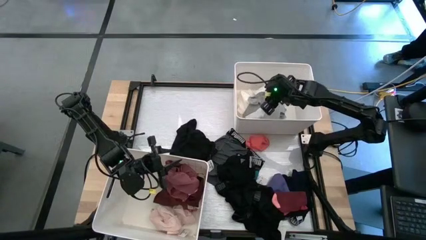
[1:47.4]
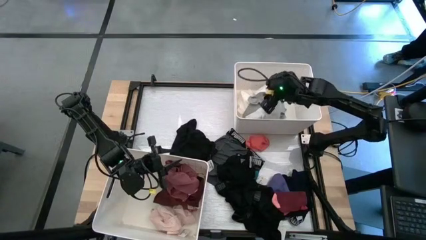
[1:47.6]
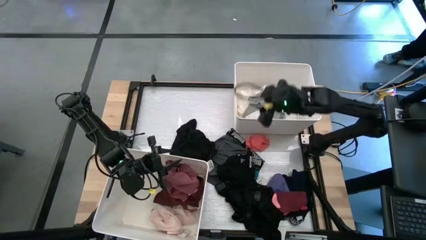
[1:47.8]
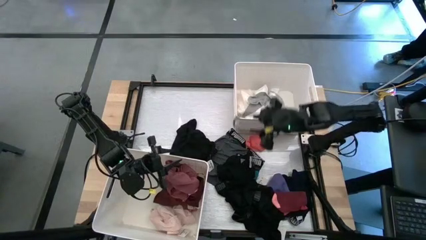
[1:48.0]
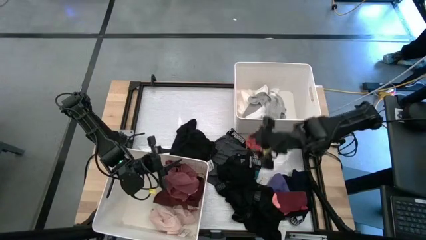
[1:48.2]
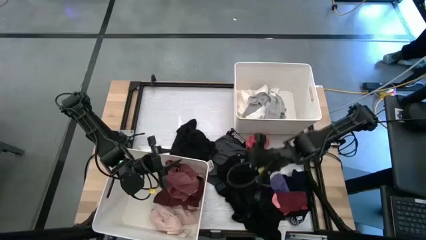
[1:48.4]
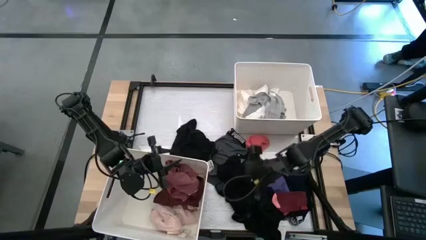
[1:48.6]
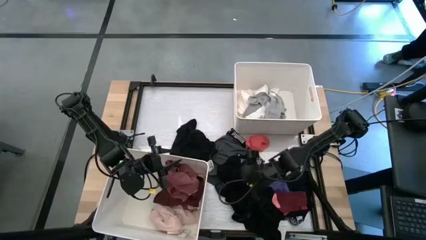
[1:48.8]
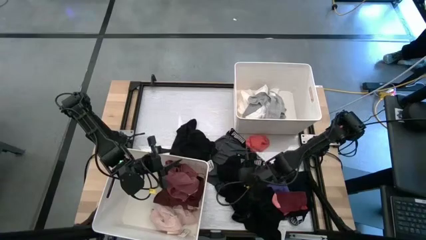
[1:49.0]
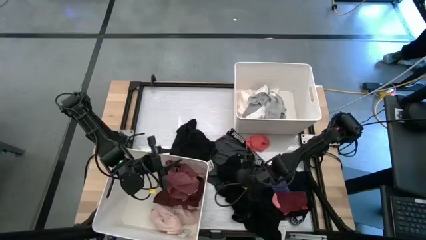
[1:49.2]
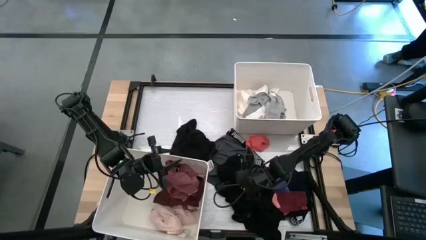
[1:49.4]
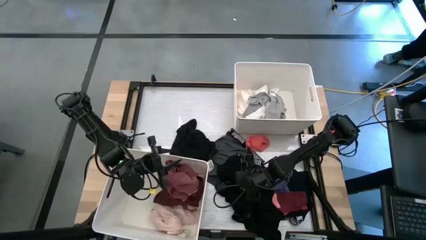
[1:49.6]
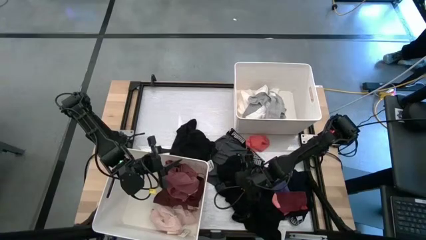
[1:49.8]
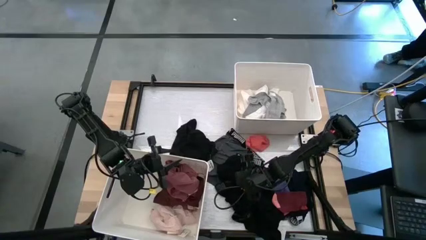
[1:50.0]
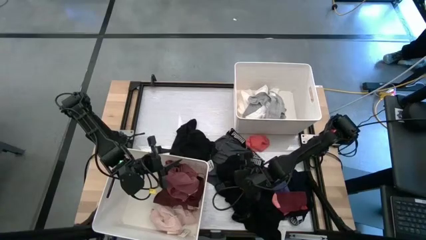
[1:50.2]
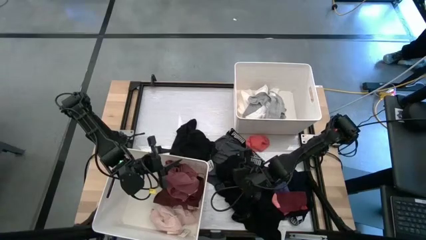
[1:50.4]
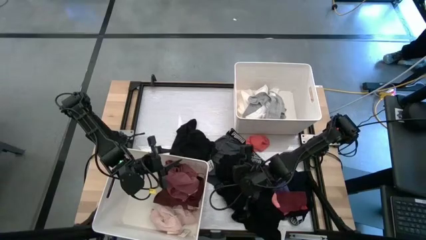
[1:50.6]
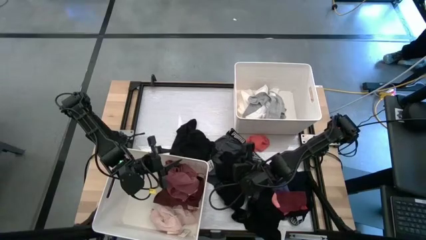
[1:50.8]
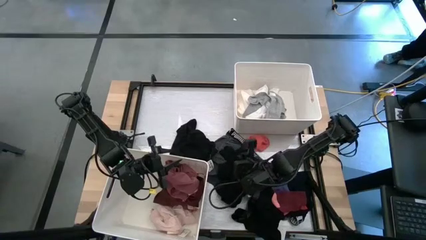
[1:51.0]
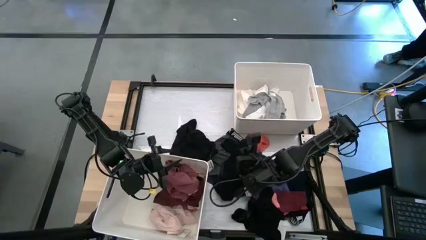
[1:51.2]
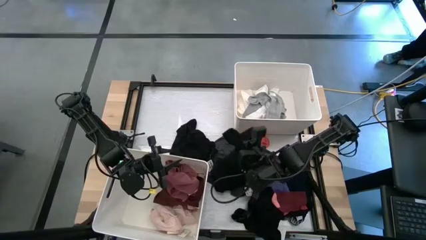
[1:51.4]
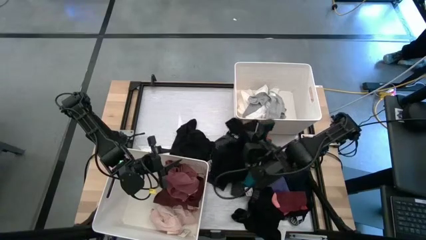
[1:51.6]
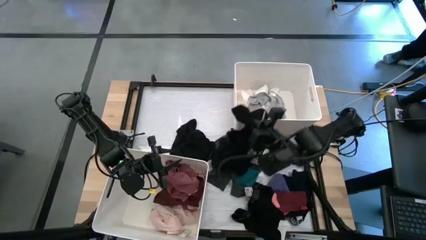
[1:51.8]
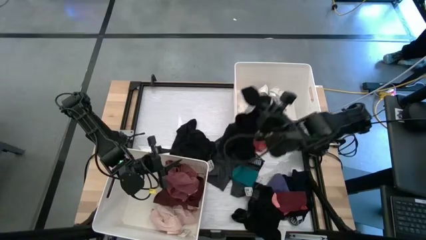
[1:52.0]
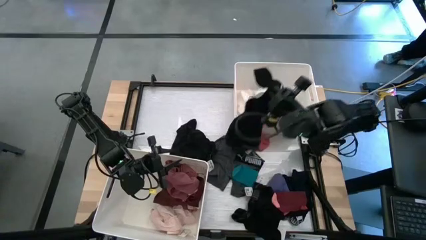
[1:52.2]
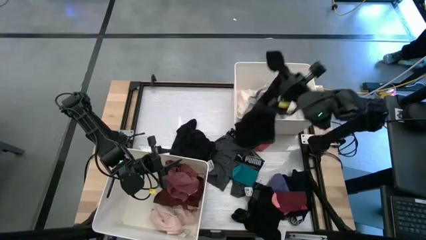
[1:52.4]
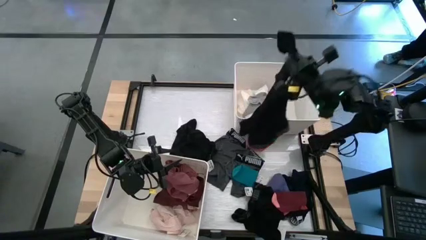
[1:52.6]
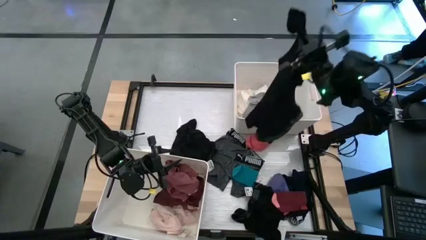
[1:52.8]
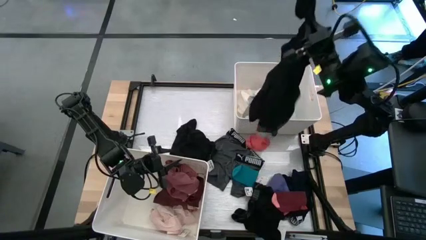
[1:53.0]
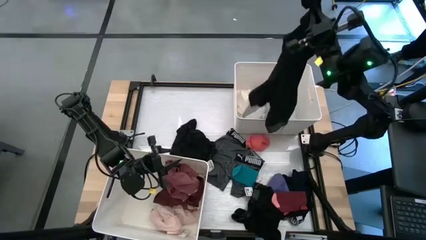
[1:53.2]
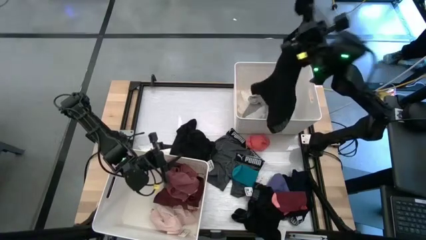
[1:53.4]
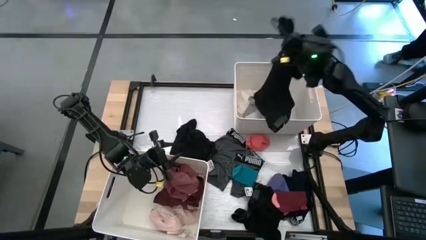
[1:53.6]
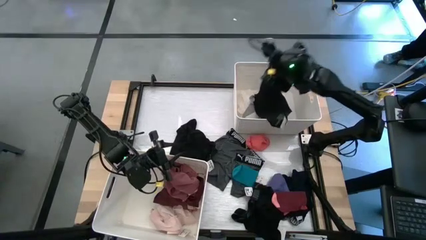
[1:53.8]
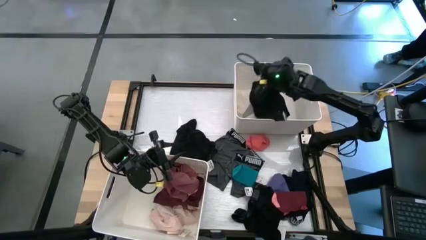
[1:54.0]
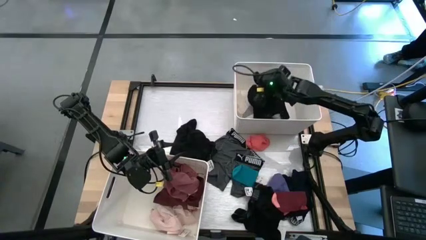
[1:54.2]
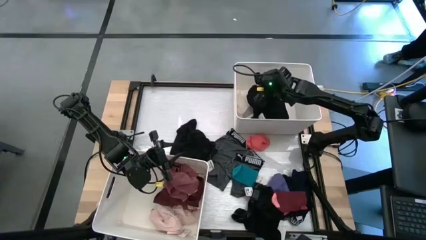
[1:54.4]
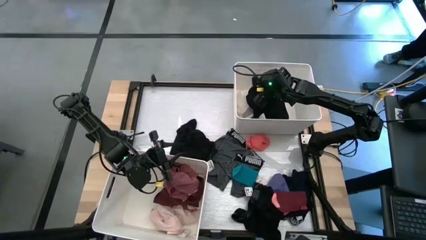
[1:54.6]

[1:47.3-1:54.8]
Task: Sort clothes
Put the black shirt into the top white bin

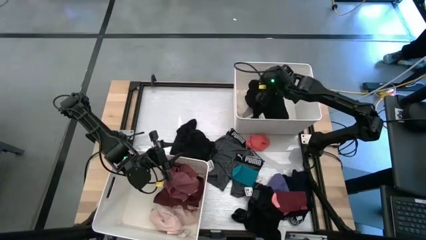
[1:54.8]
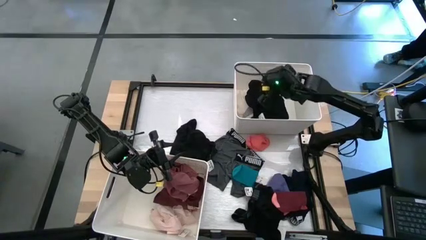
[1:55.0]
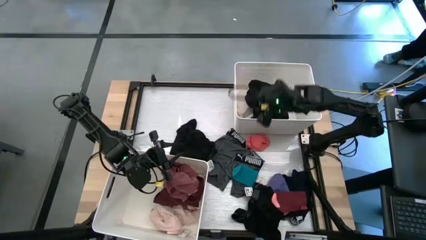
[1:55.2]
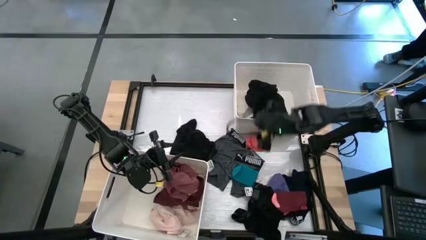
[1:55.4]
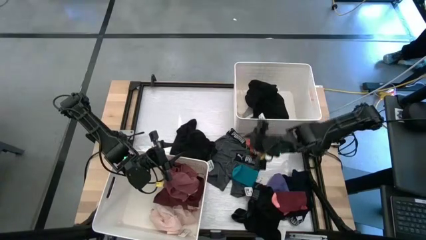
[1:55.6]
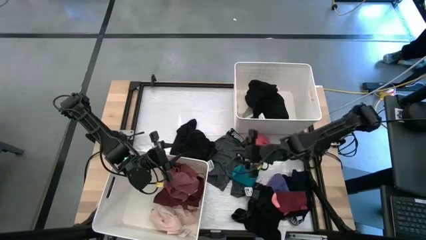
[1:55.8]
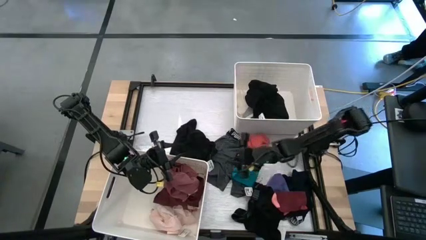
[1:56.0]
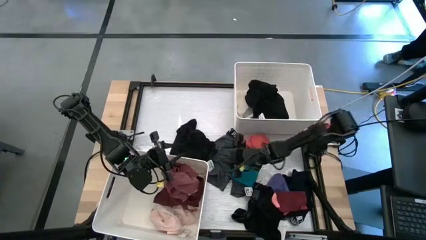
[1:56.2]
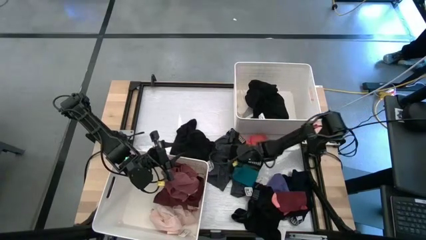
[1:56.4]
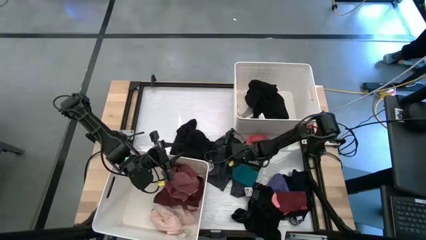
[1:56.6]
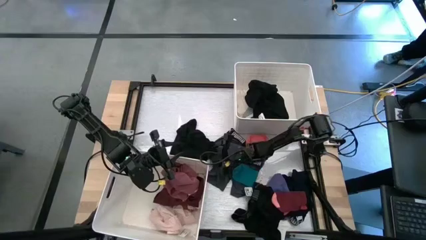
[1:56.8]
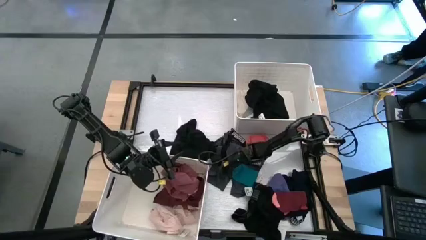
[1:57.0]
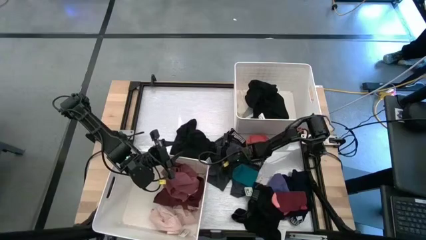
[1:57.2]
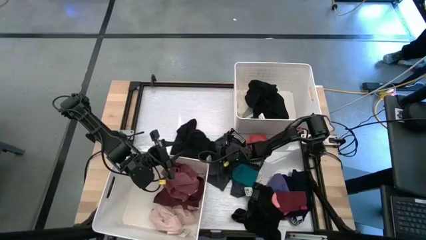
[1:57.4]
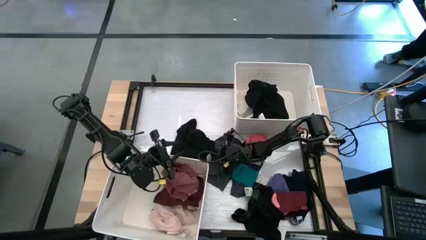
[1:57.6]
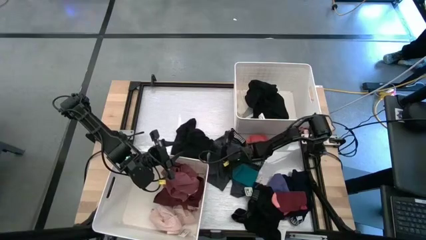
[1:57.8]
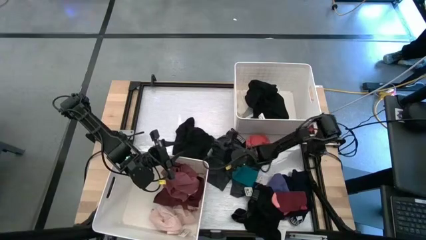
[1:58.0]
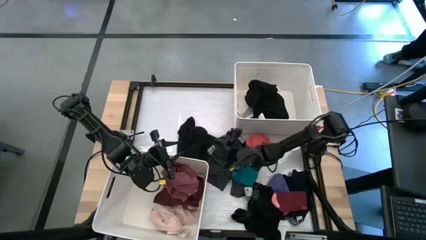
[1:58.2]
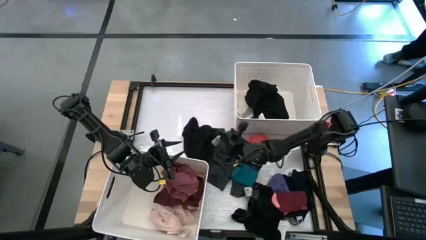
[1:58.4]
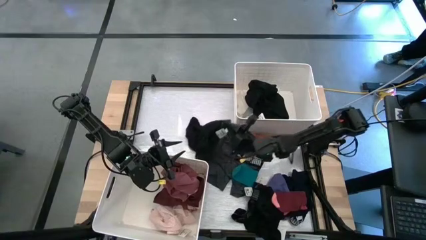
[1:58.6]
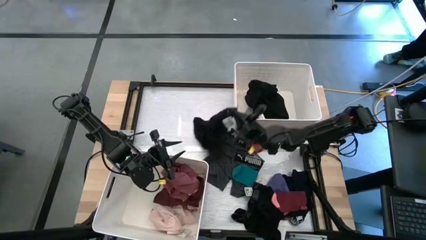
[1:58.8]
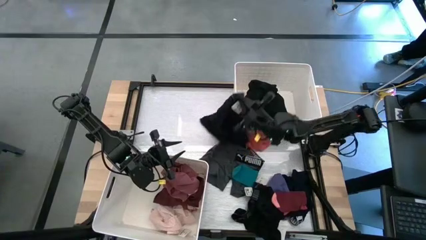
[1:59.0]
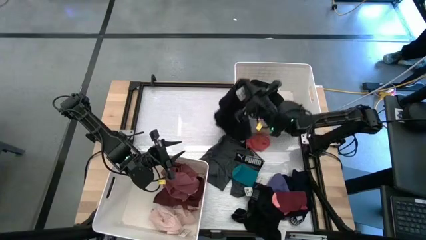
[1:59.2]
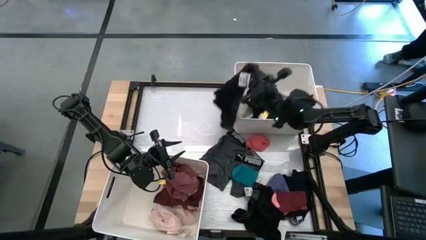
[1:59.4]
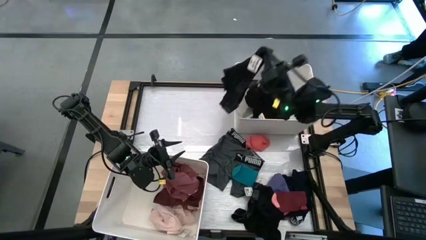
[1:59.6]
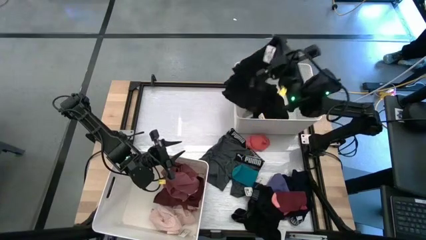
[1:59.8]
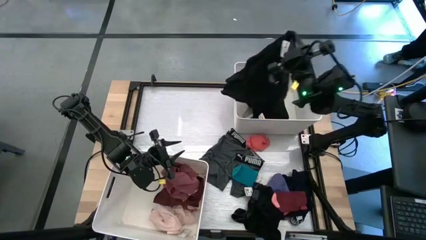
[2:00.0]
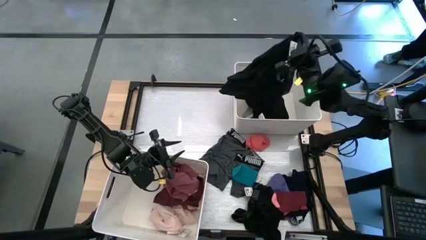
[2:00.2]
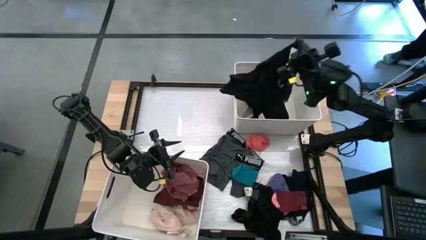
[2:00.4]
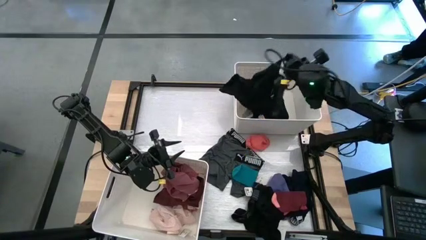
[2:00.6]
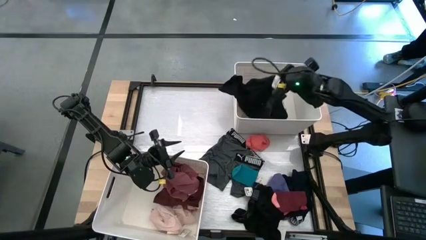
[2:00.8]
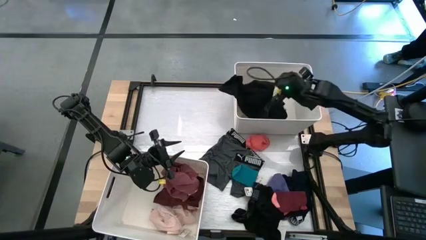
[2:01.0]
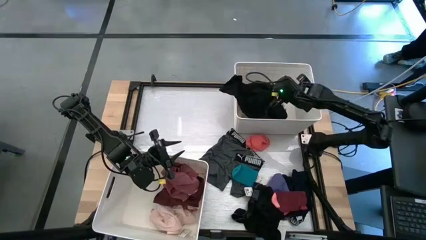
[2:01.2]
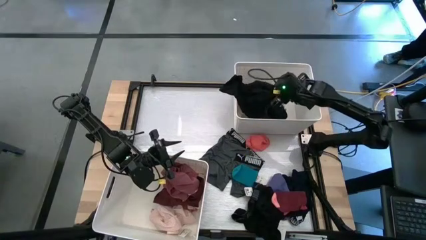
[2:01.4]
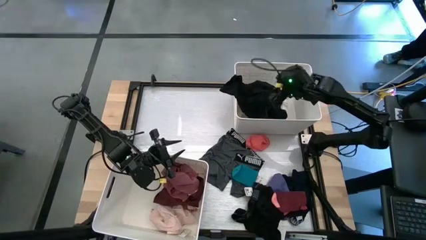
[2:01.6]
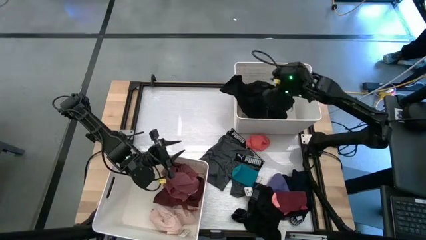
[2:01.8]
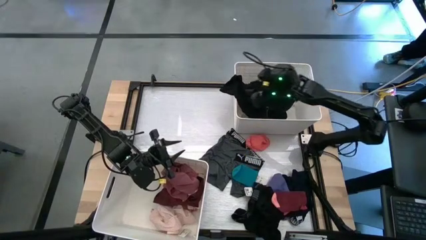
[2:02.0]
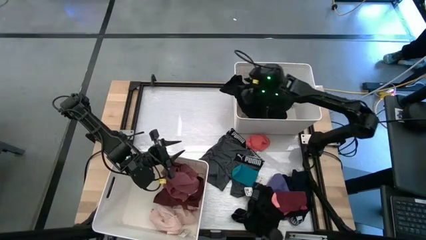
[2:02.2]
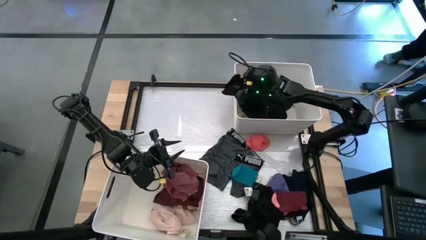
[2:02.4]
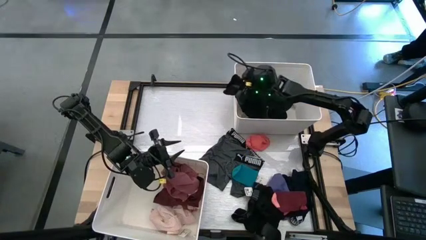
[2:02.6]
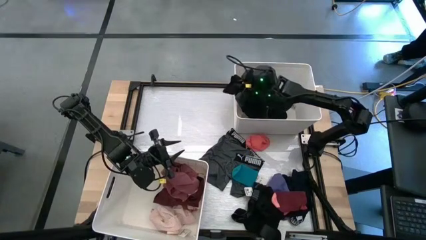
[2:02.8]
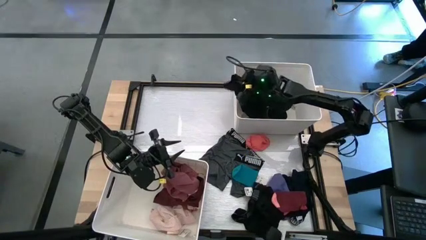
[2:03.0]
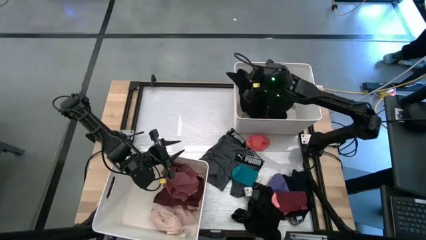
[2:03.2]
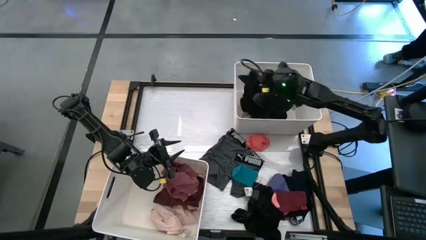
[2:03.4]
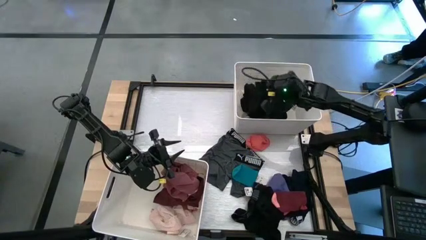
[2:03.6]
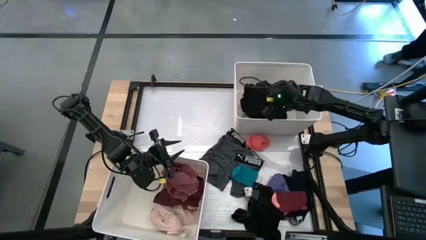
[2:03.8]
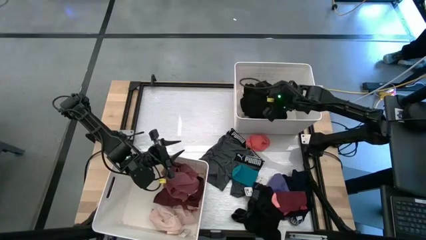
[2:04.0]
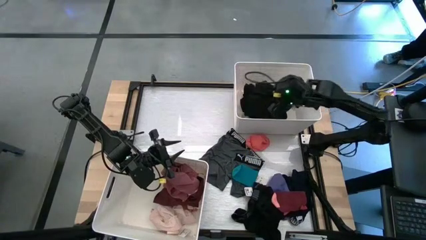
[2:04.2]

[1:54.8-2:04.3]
Put the stripe boxer into the top white bin
